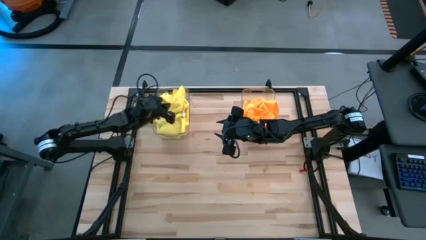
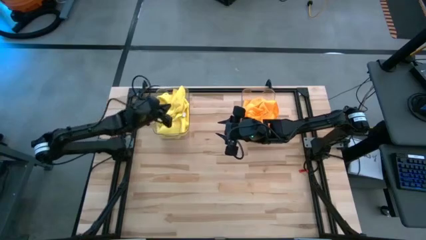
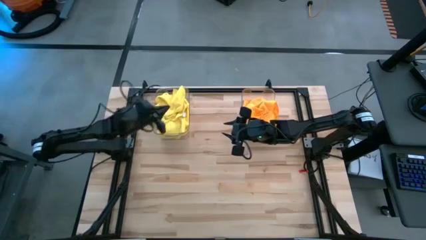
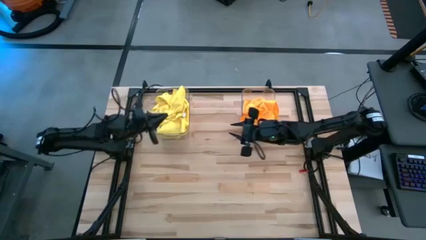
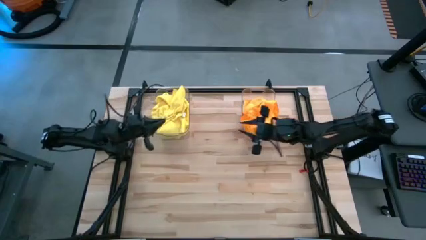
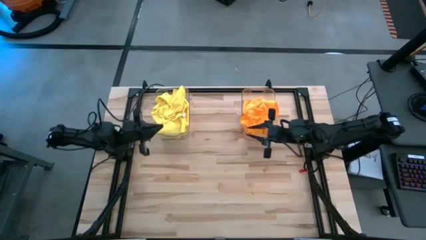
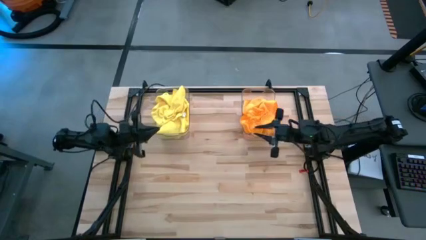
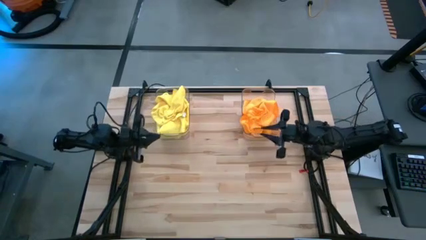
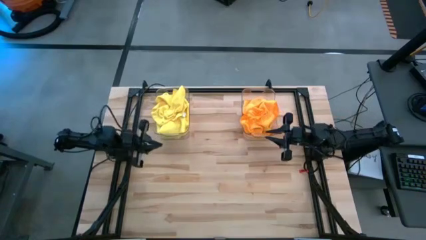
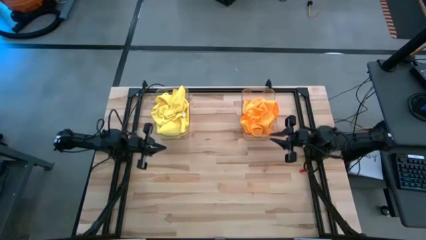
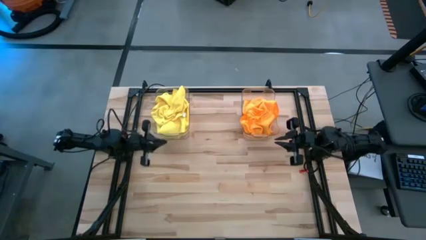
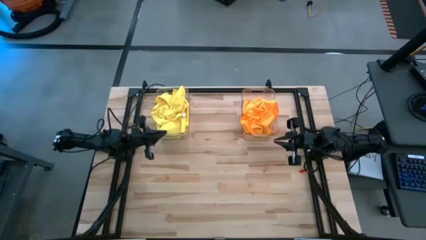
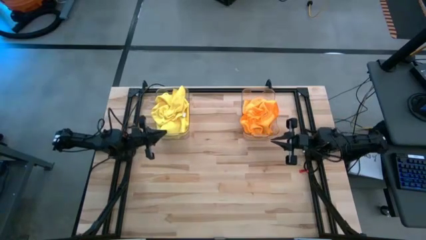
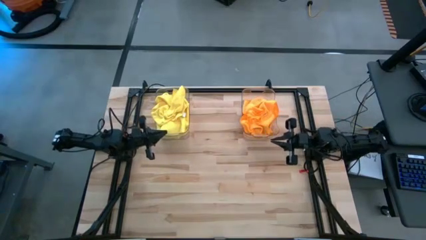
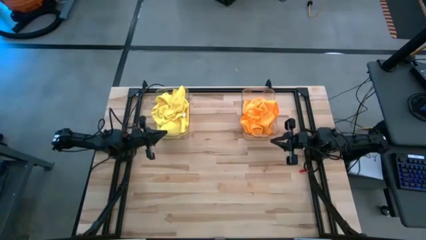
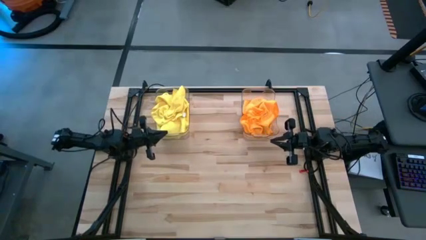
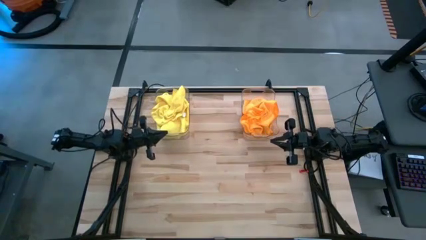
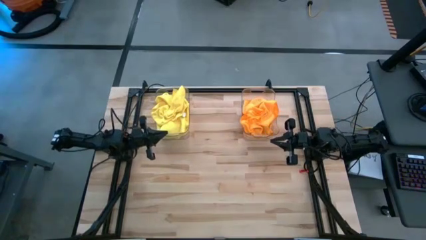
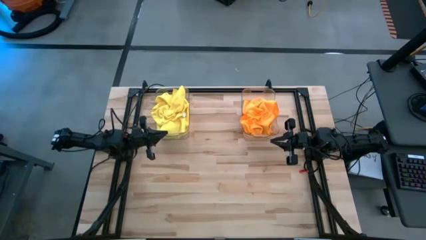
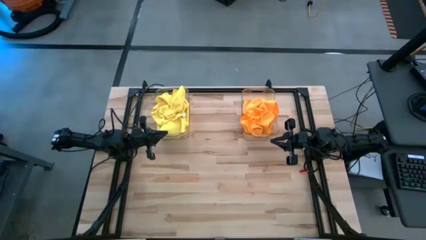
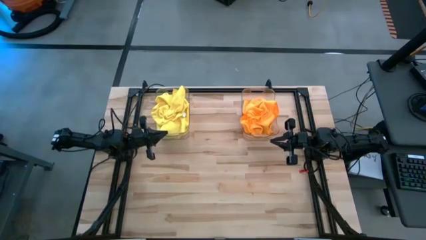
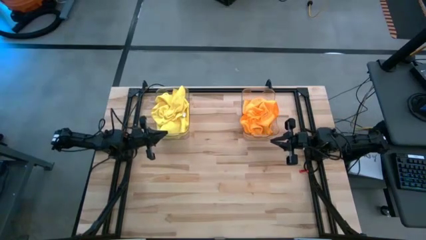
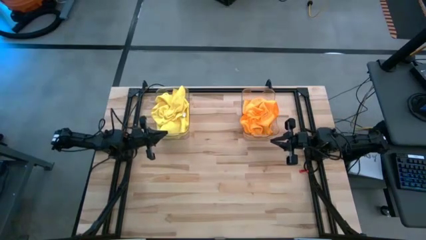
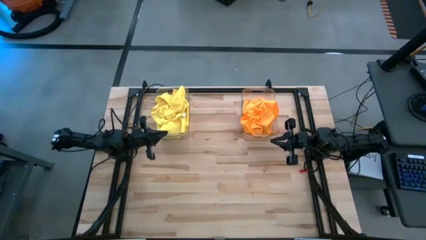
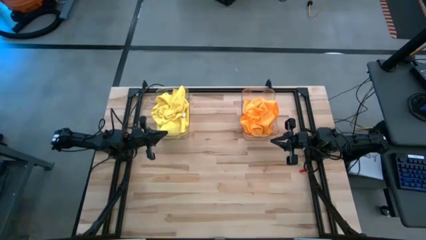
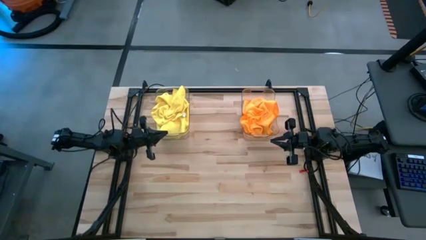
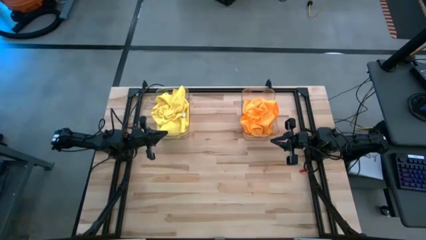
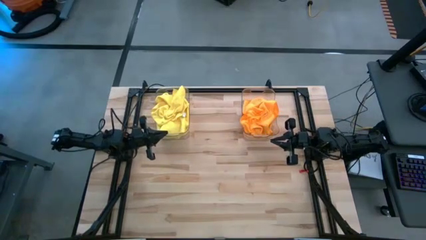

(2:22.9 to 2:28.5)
Task: Sort microfiber towel by color & place in baskets
Return to Home Position

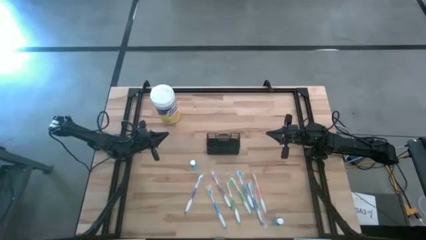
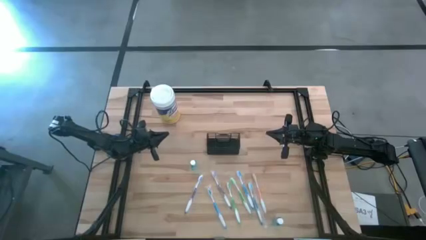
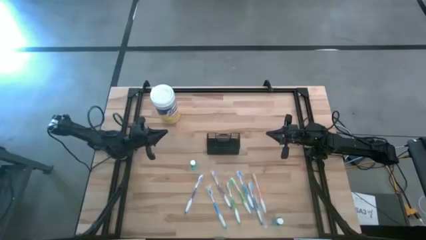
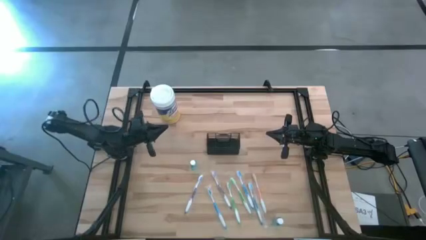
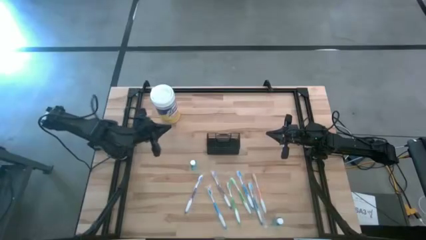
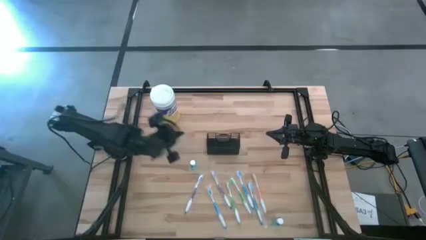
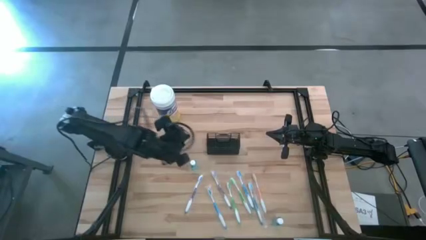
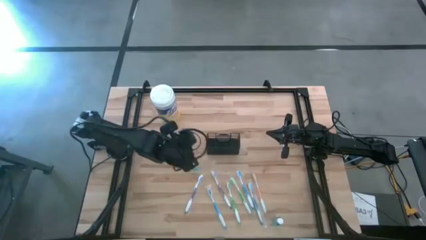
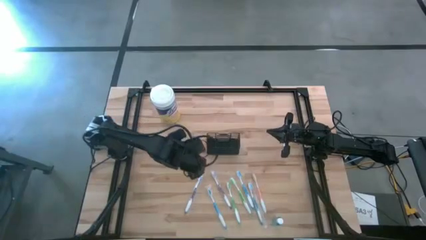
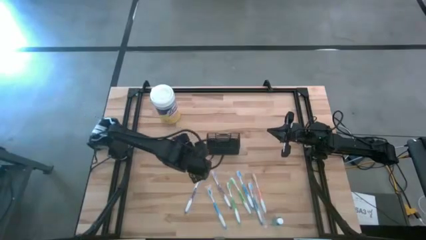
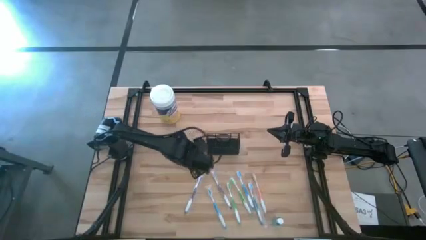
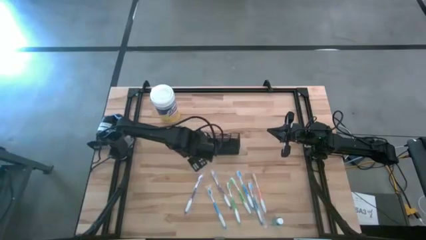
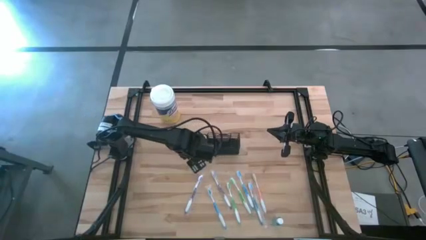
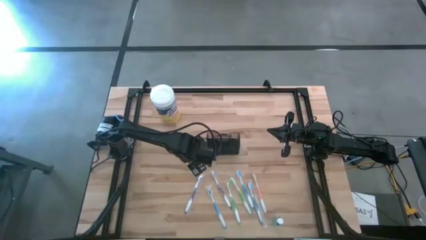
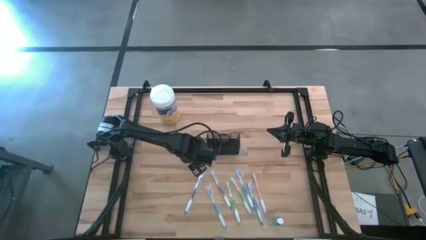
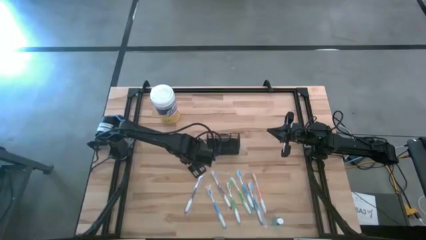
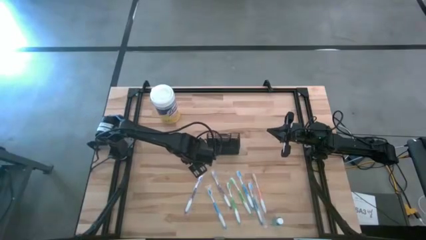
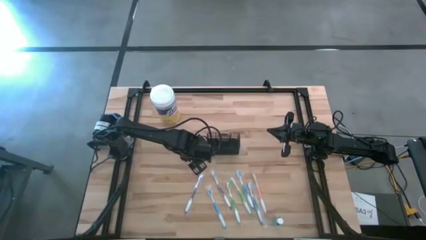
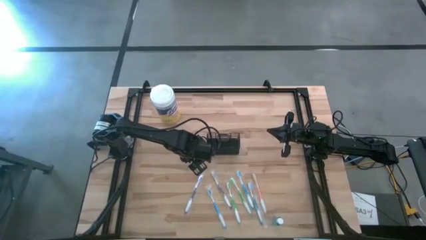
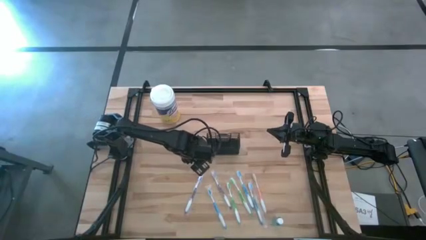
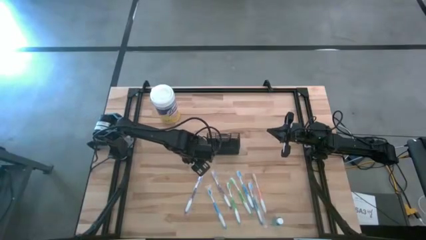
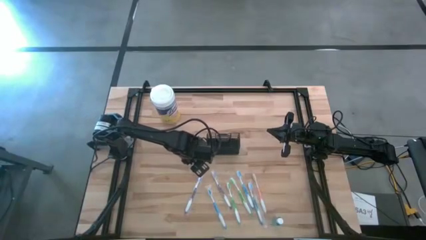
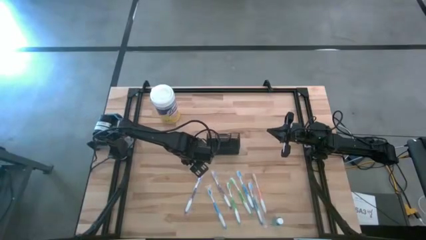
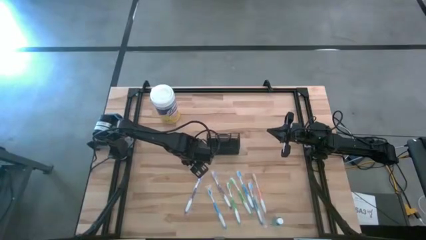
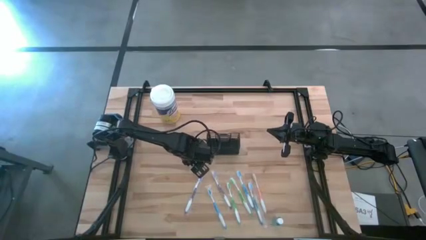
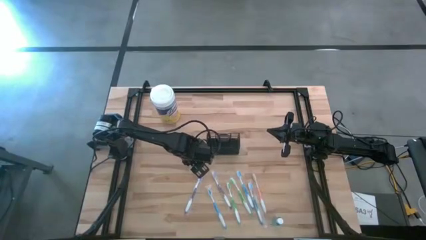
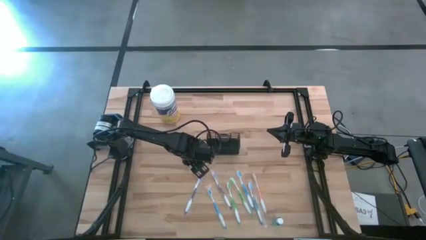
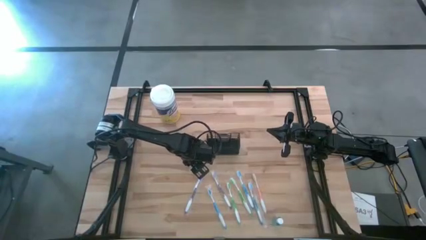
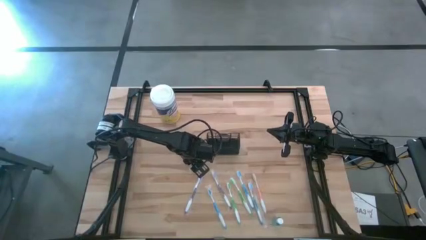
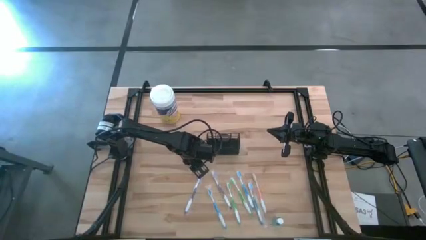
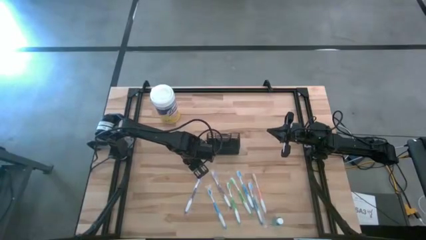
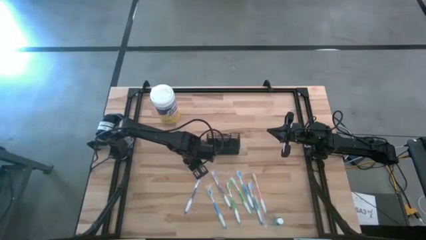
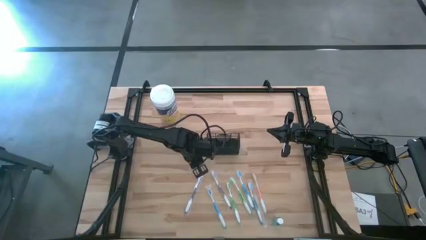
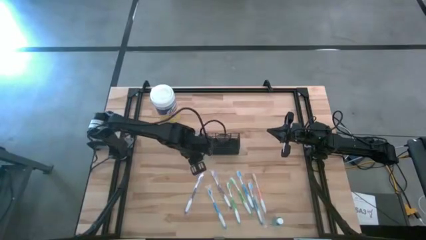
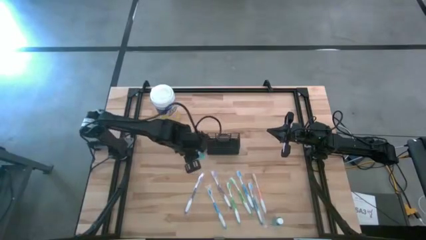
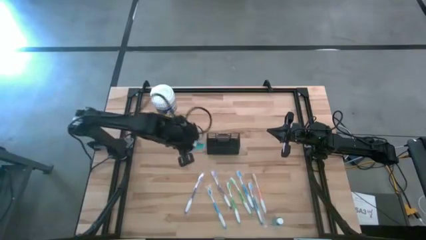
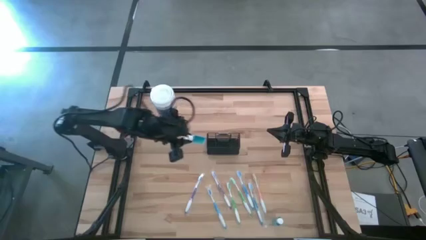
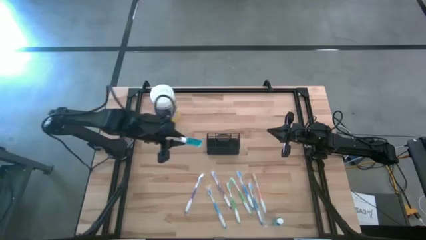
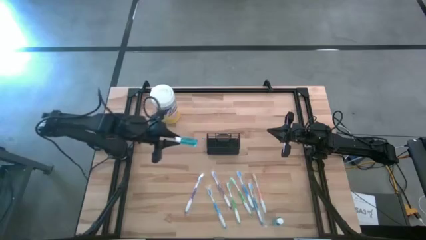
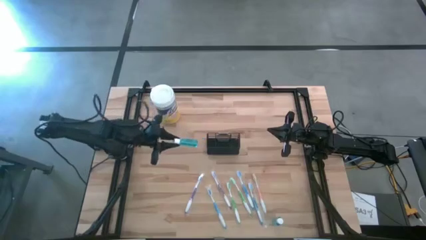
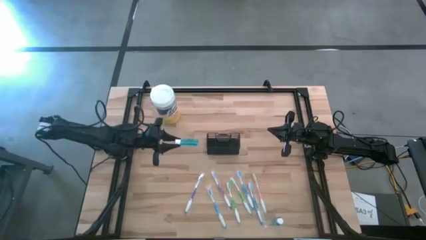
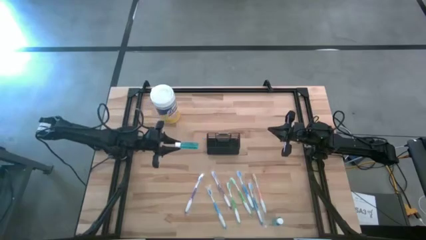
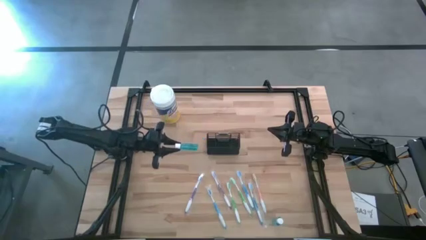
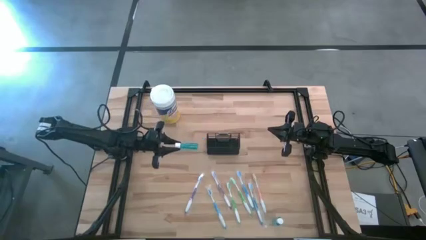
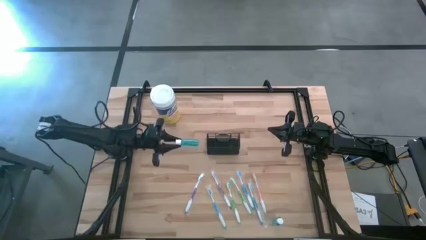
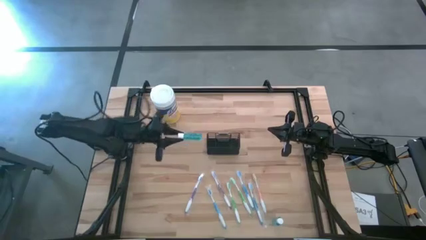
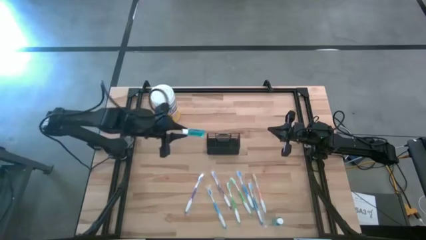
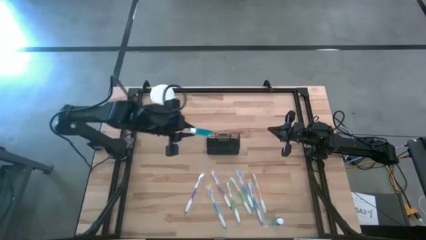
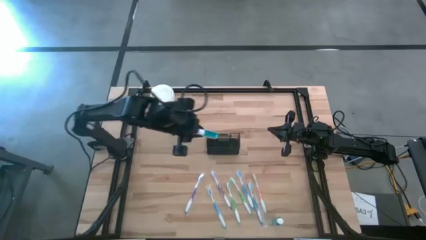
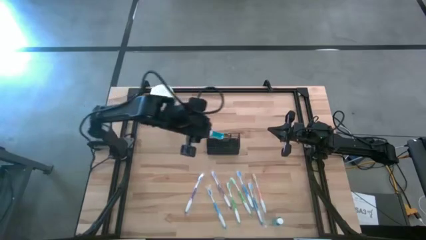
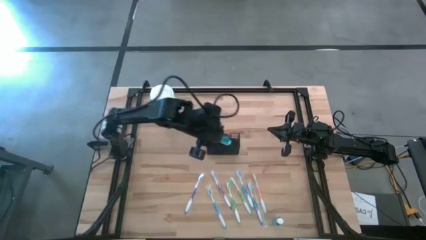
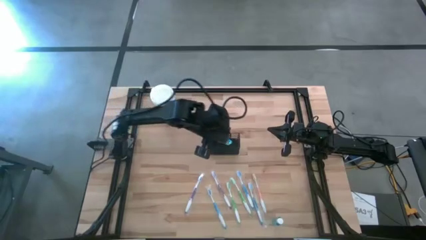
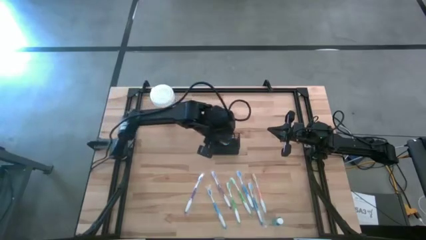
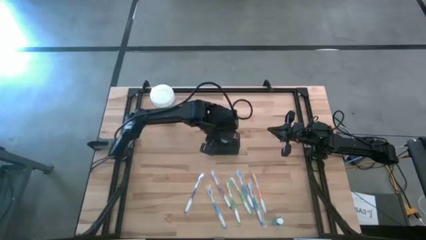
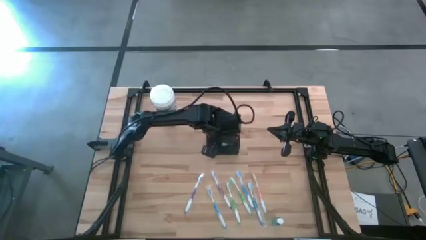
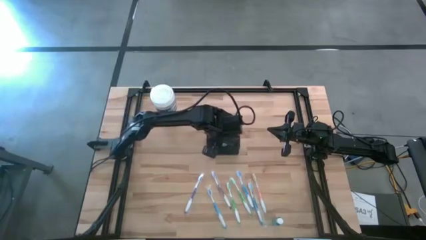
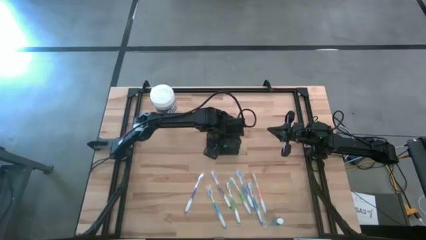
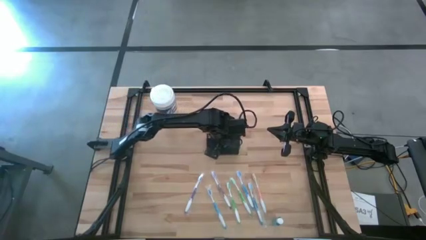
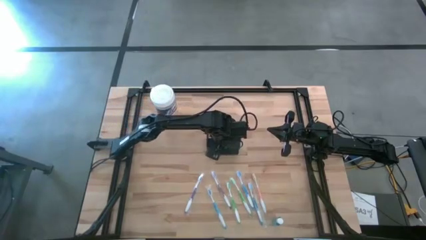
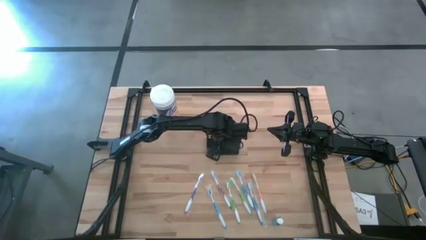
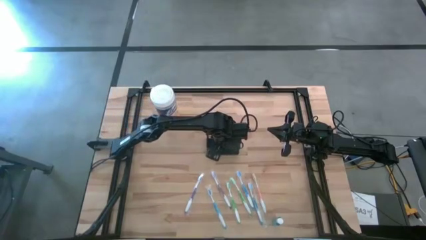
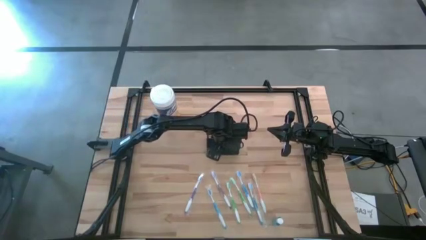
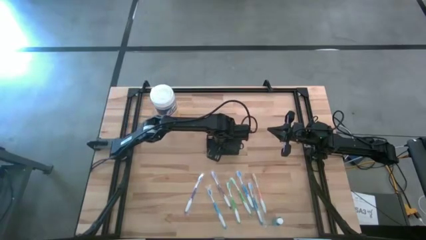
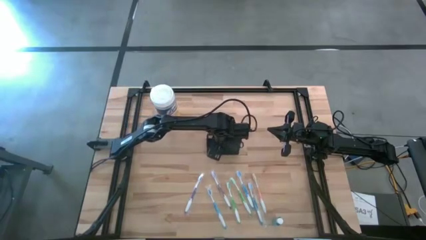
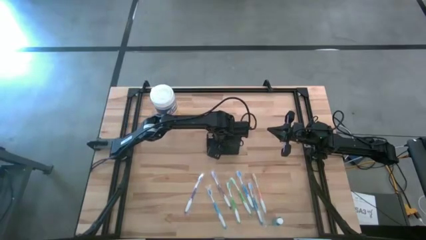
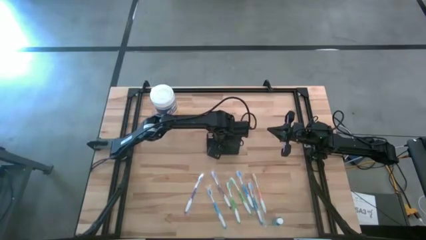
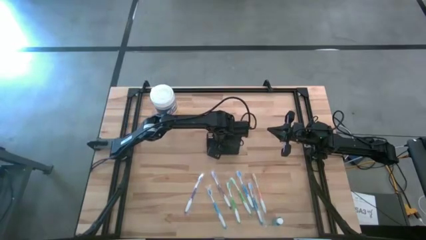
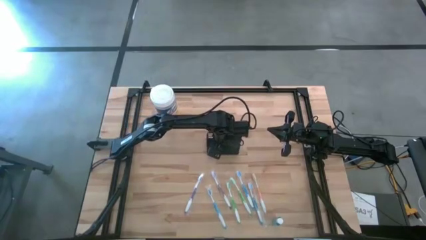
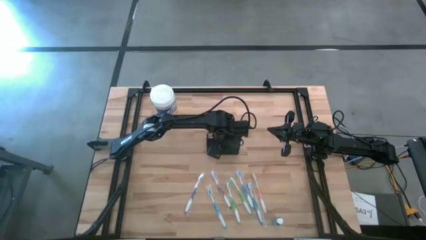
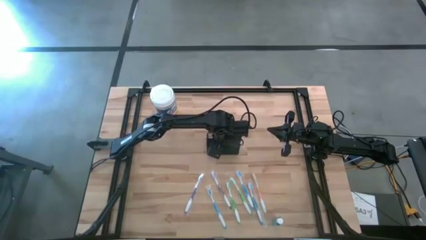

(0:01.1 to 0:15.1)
Task: Pick & Place toothbrushing station
Put the top blue mouthwash into the wire organizer
